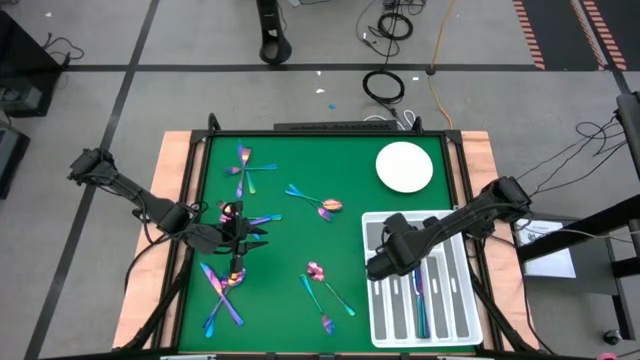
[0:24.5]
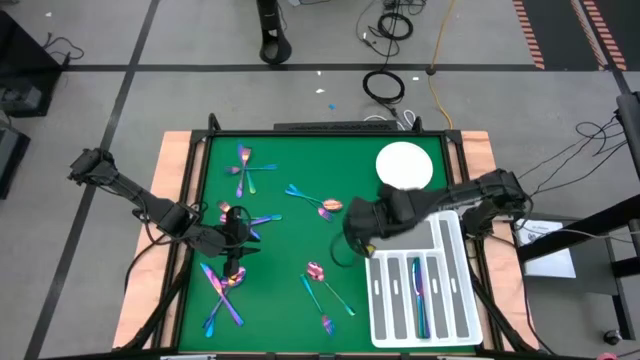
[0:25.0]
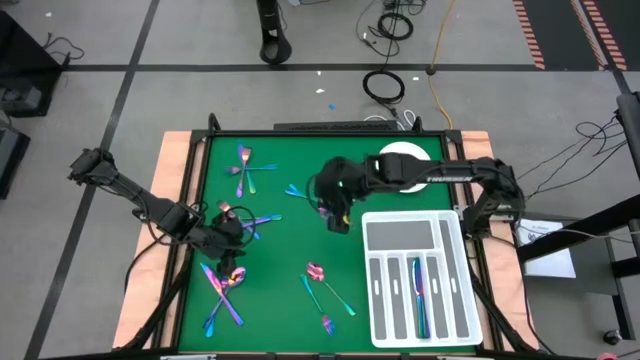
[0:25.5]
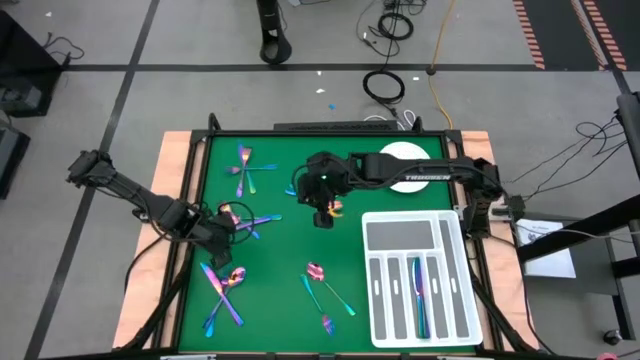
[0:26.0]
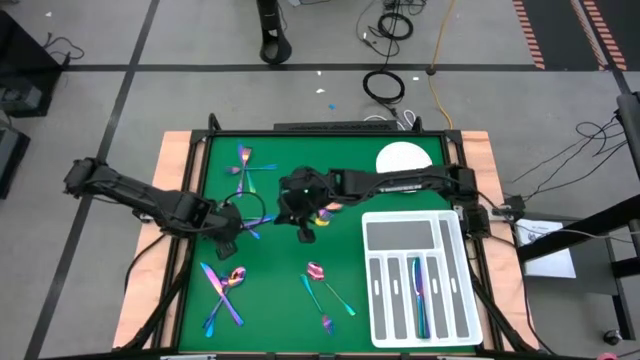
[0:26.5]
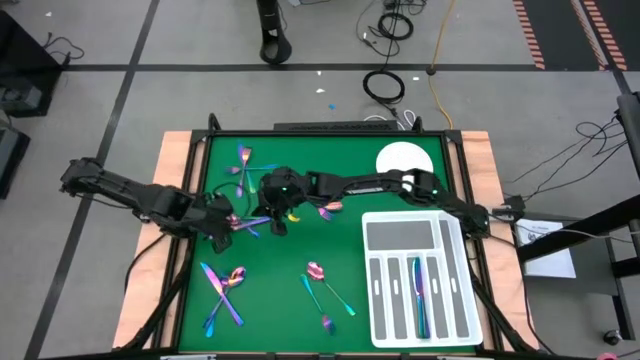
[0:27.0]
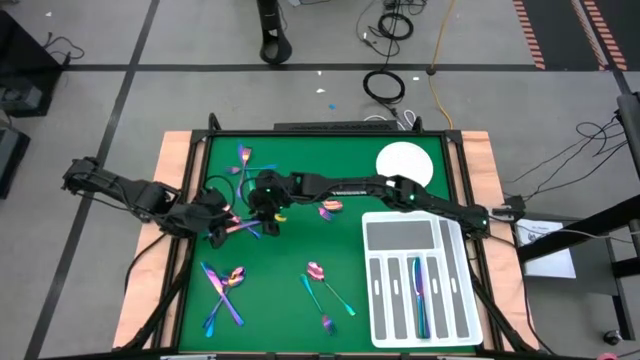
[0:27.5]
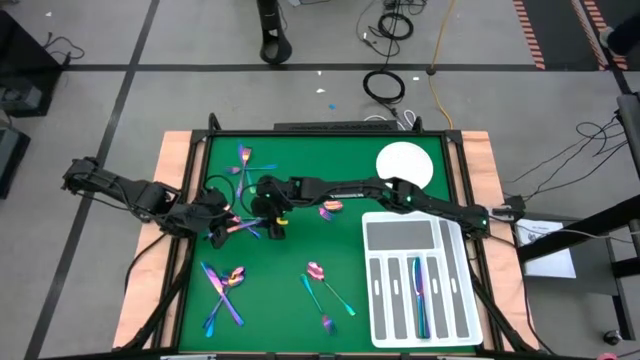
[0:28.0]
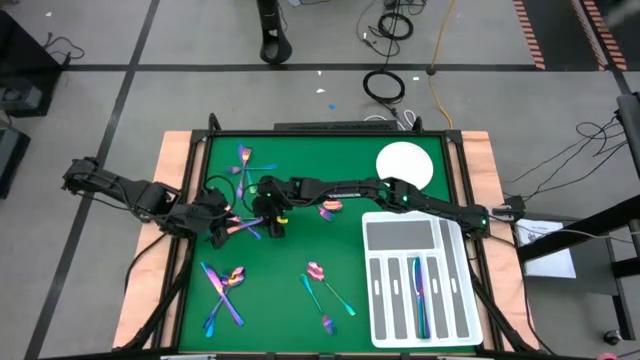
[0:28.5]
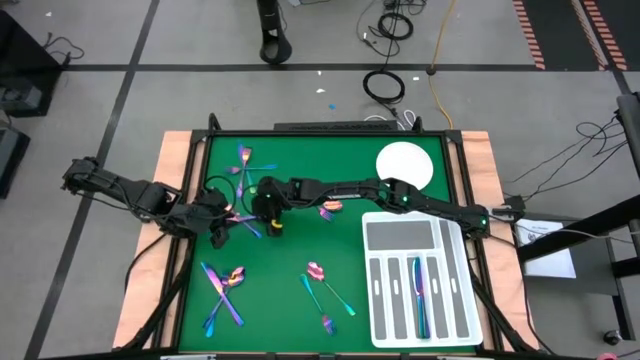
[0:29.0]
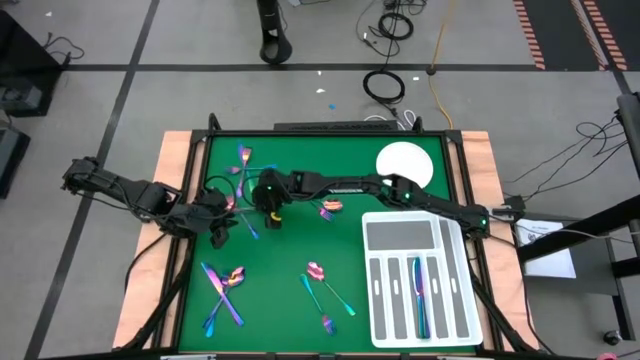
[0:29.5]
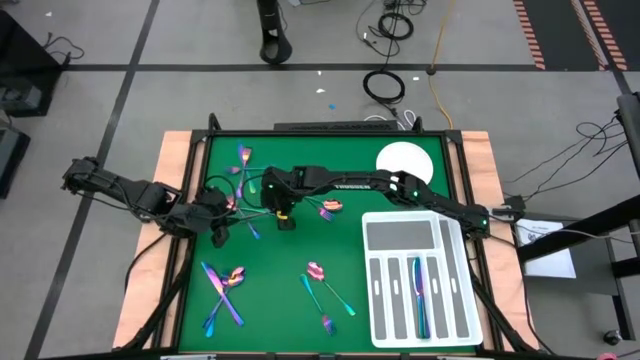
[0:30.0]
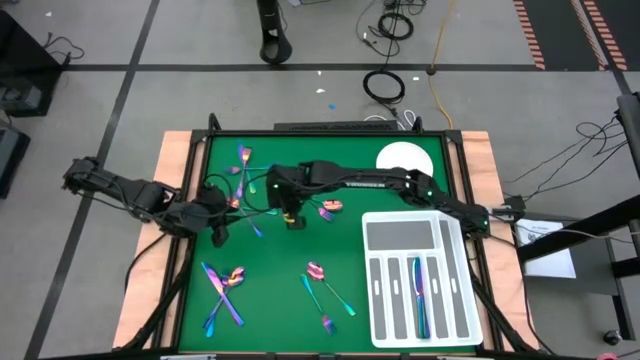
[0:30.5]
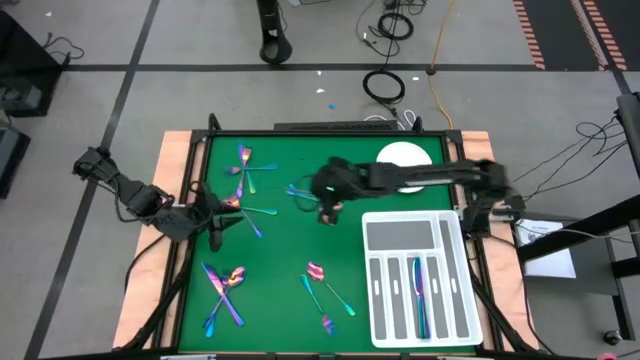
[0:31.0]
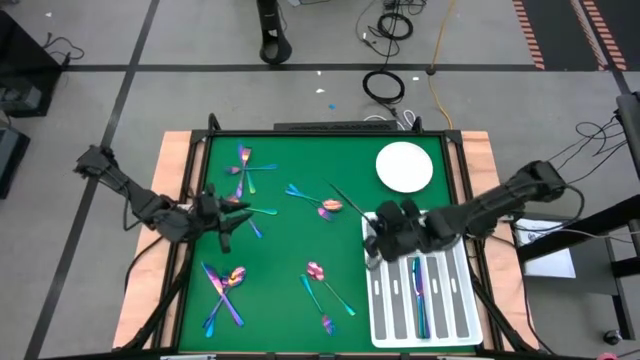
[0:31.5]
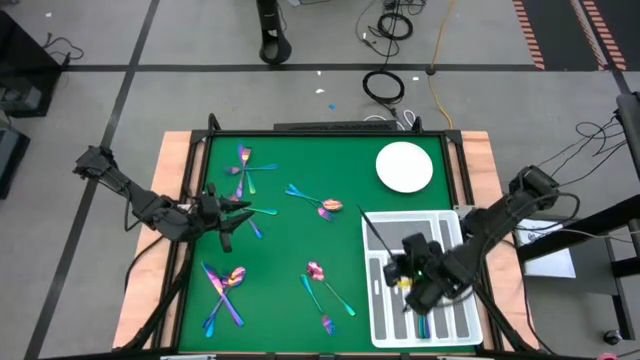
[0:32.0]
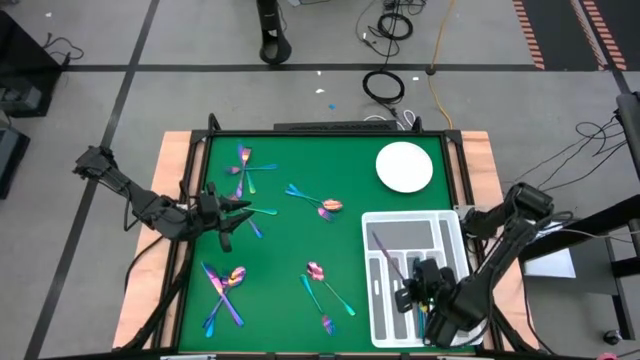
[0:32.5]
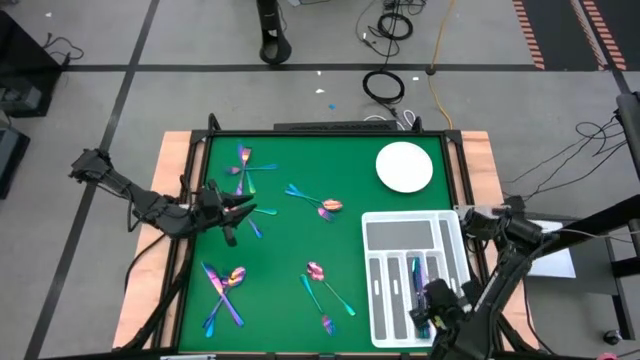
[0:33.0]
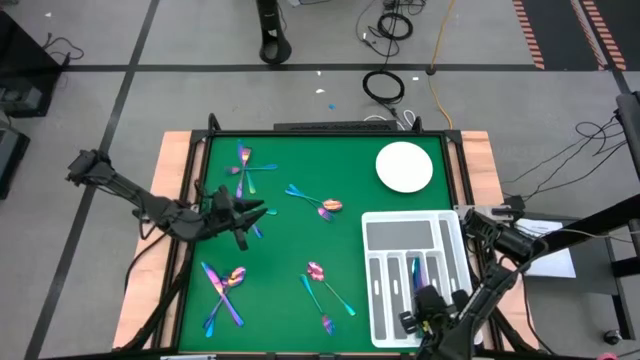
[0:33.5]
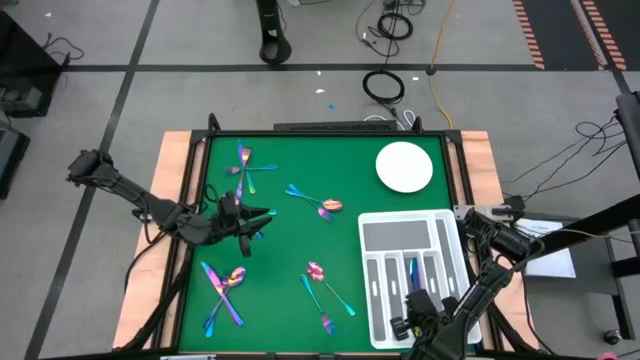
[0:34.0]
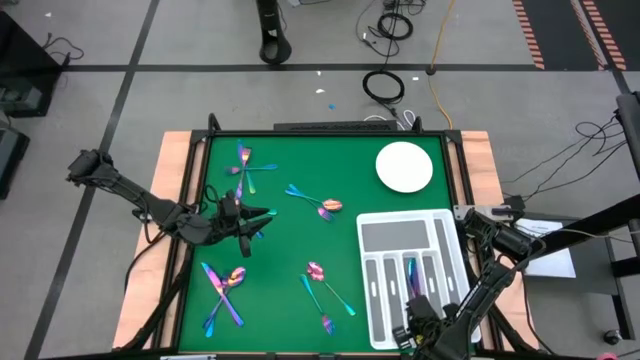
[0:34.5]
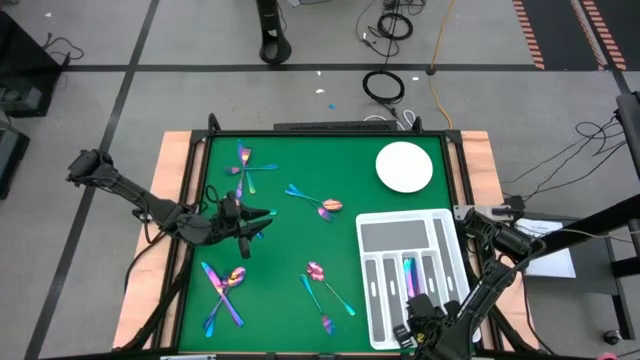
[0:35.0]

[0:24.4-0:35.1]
Task: Sort silverware
Put the middle left knife into the utensil organizer

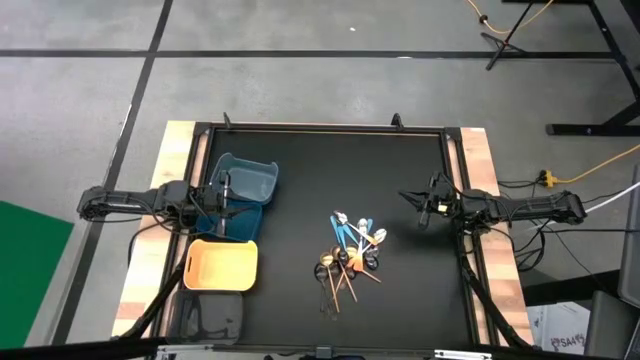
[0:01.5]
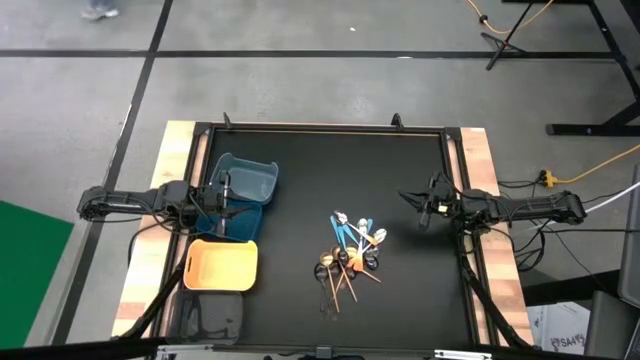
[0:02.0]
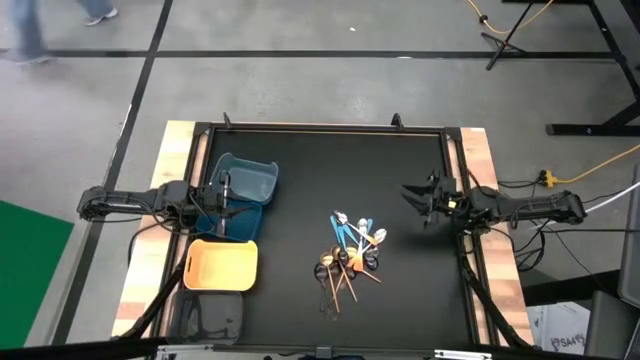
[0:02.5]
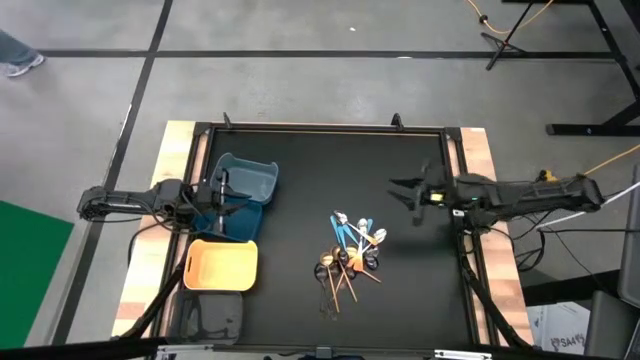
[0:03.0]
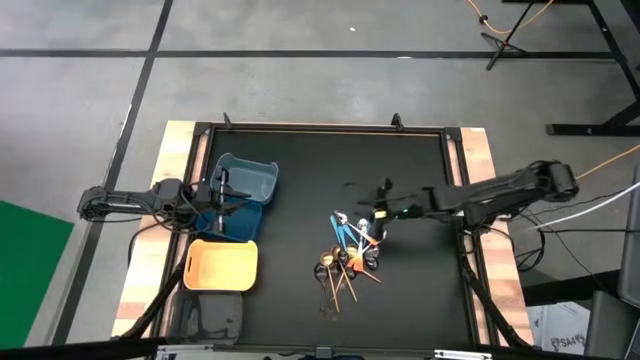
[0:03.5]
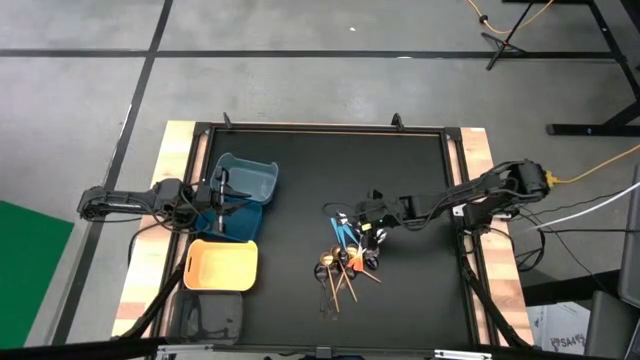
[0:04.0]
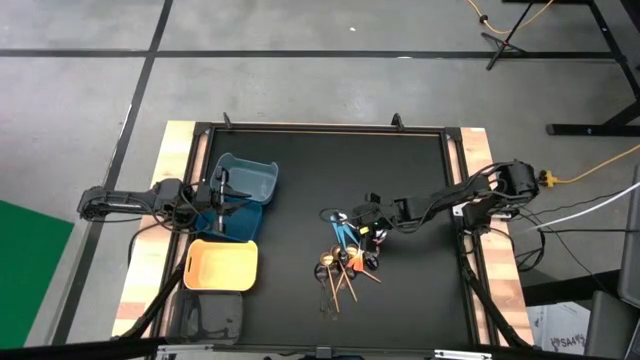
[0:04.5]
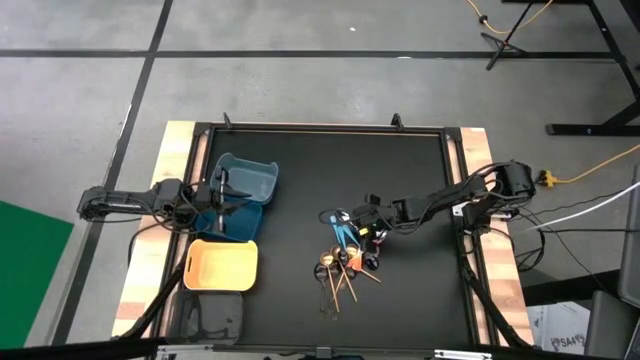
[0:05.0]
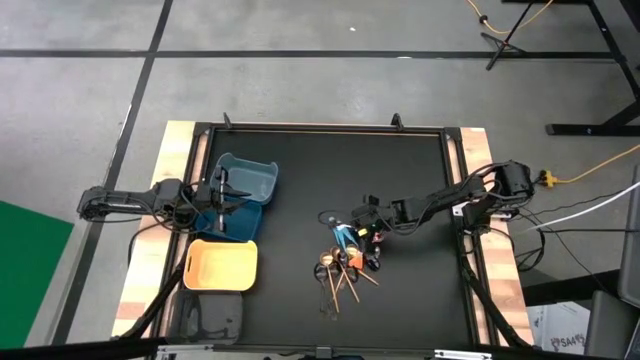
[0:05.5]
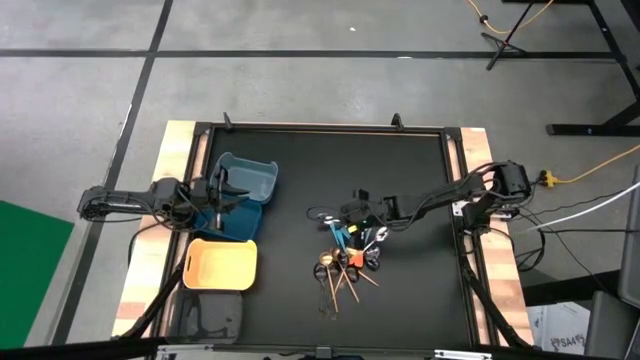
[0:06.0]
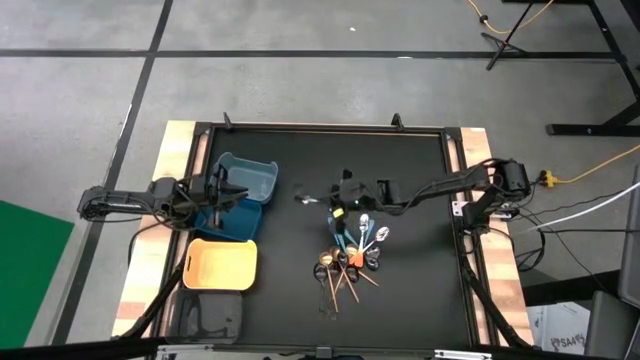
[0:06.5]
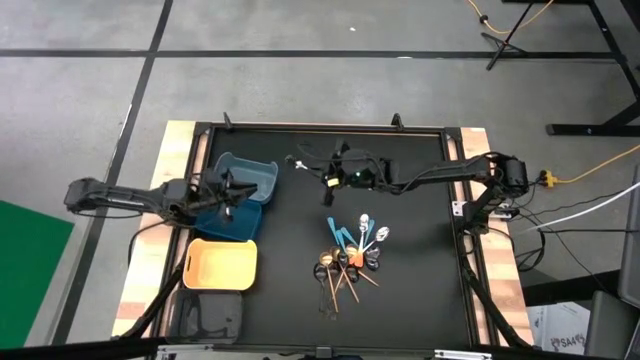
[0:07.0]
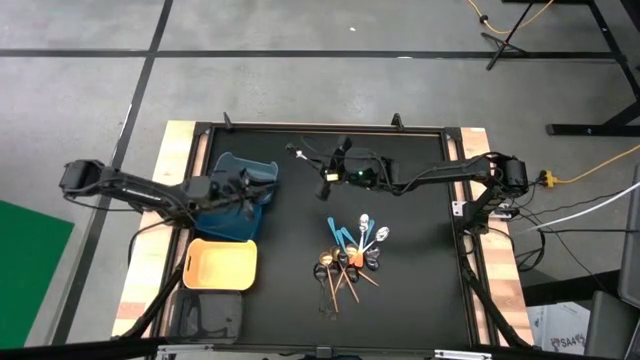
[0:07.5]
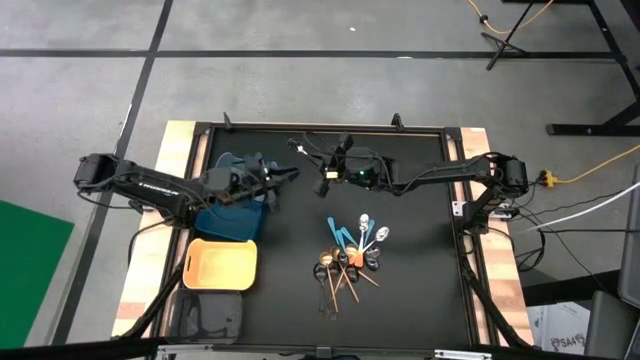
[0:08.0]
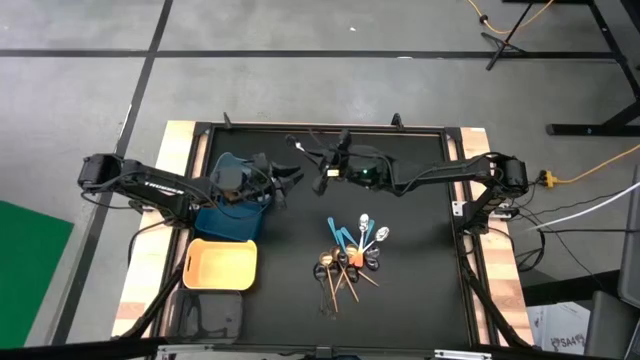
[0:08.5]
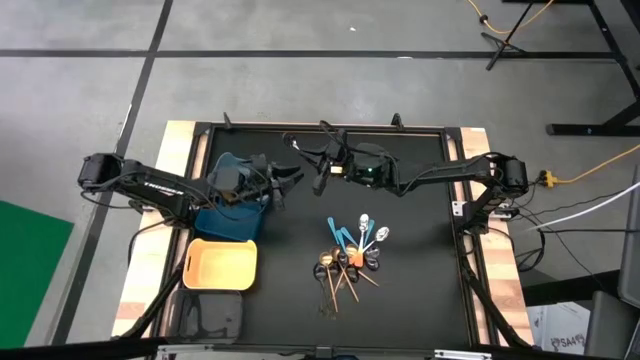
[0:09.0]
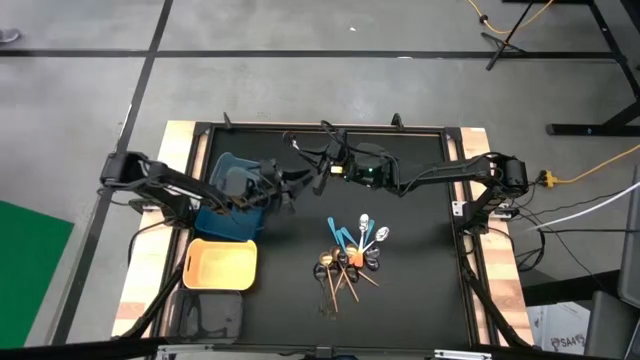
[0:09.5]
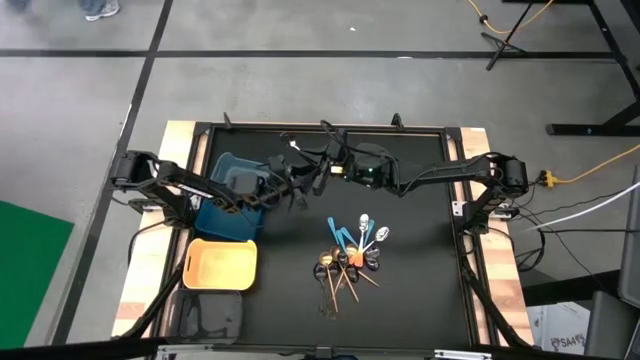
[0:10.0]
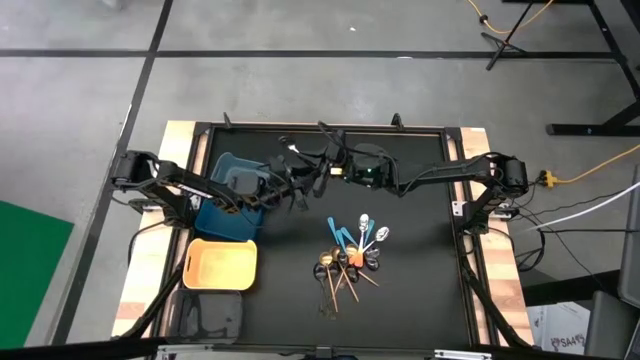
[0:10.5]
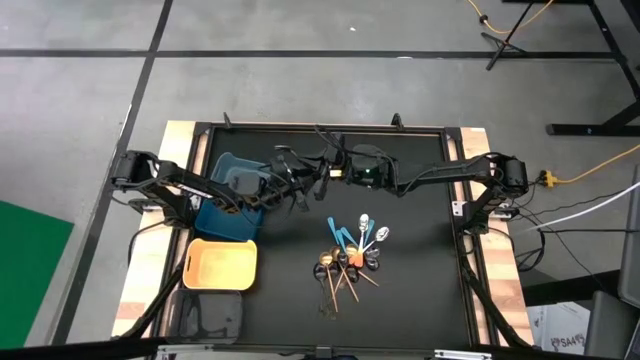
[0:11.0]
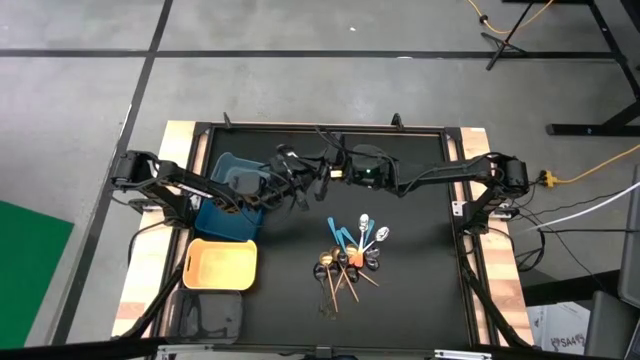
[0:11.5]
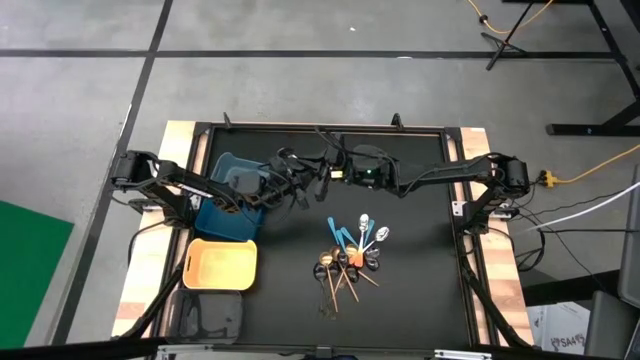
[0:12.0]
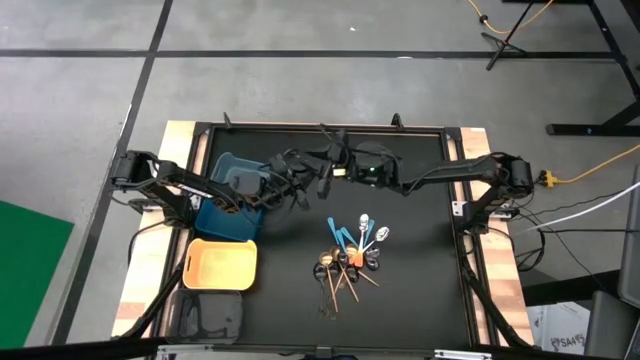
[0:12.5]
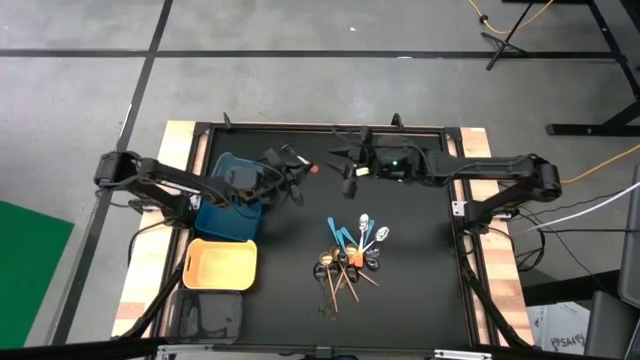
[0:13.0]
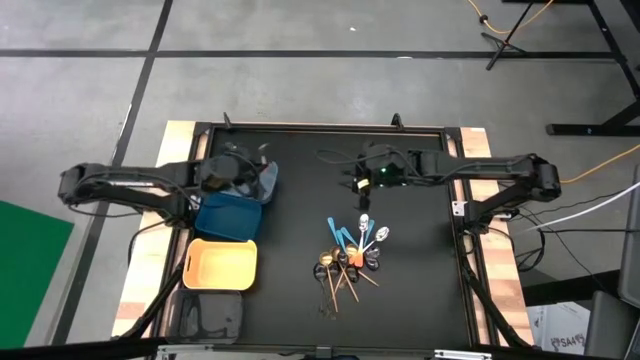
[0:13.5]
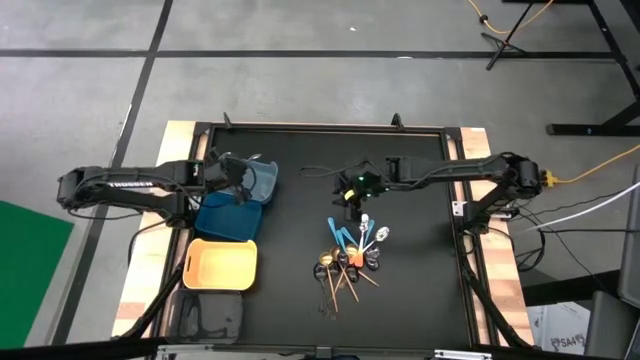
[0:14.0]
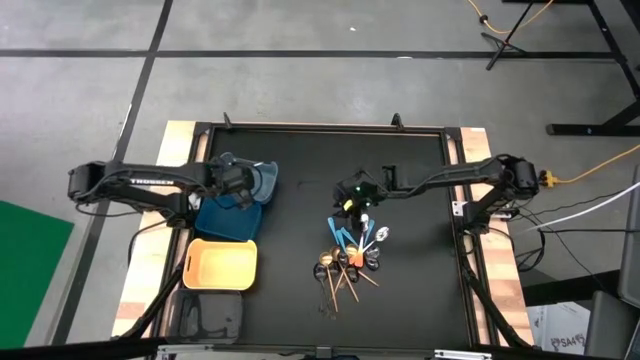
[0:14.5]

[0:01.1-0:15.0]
Task: Sort silverware by color (type)
Put the orange spoon into the light green bin
